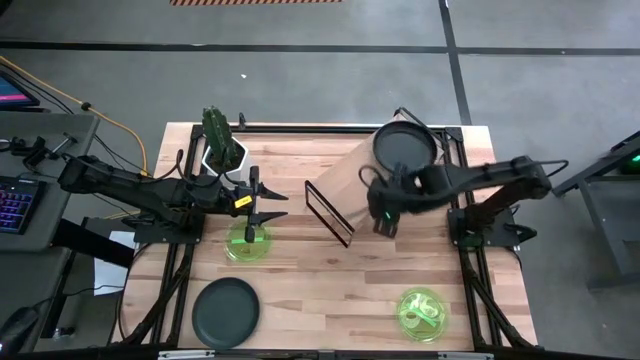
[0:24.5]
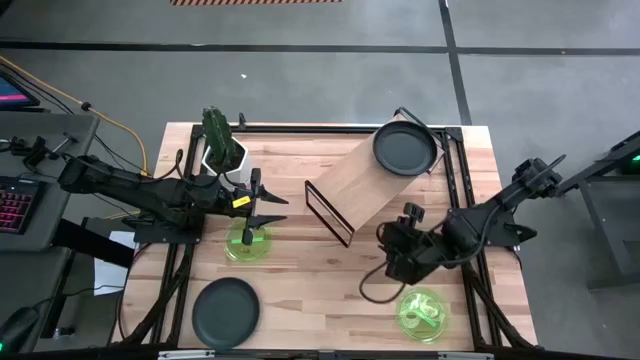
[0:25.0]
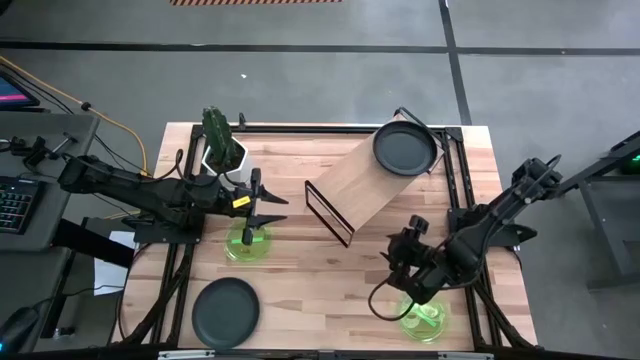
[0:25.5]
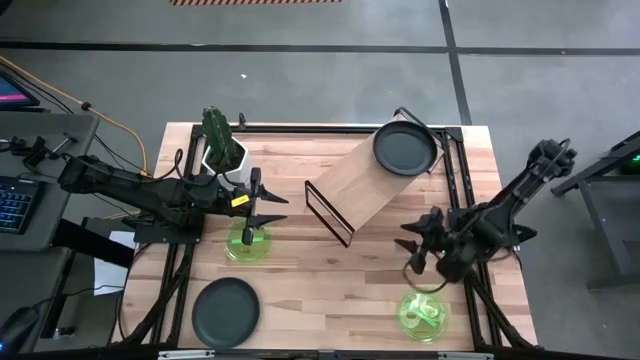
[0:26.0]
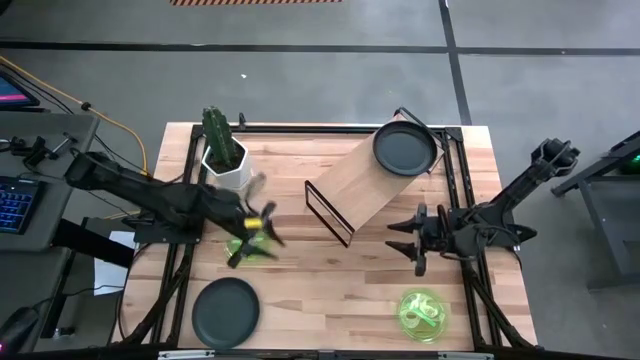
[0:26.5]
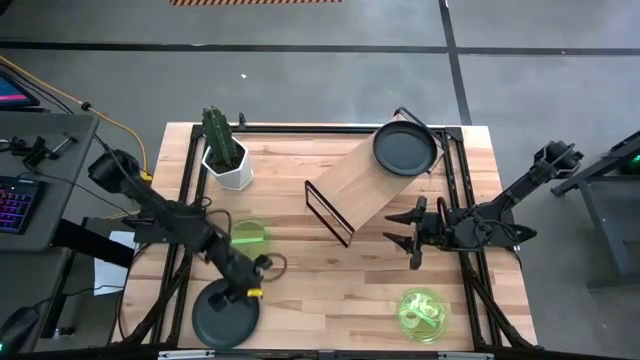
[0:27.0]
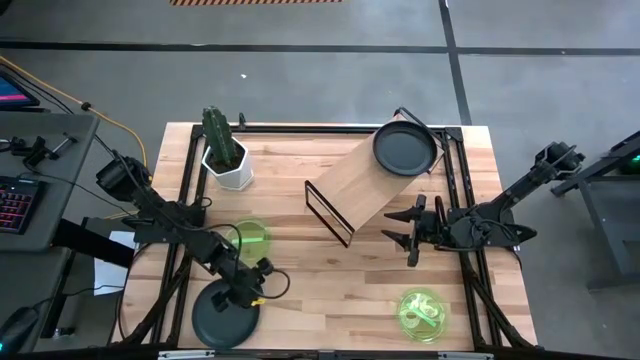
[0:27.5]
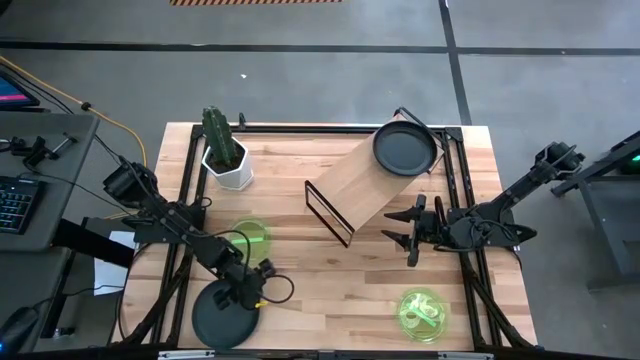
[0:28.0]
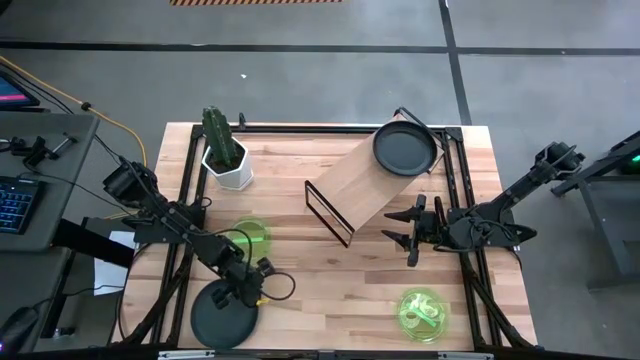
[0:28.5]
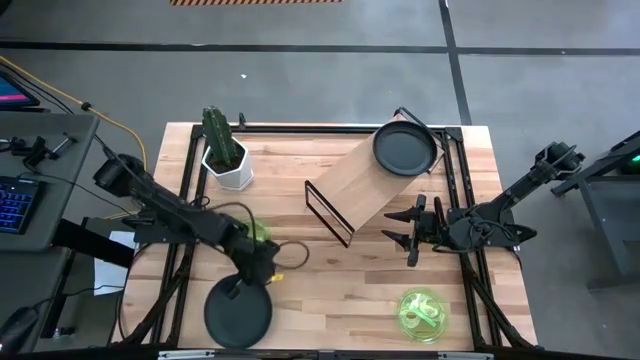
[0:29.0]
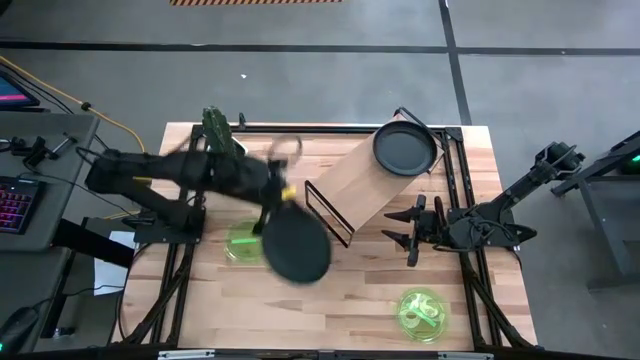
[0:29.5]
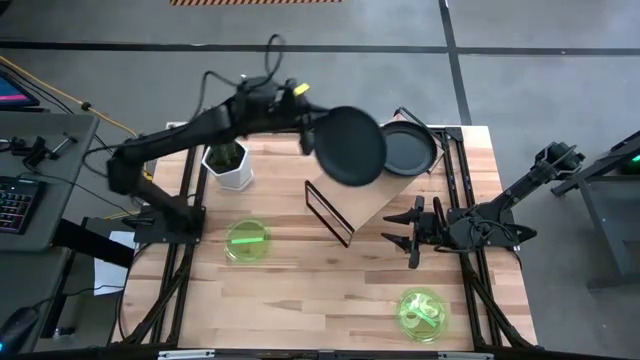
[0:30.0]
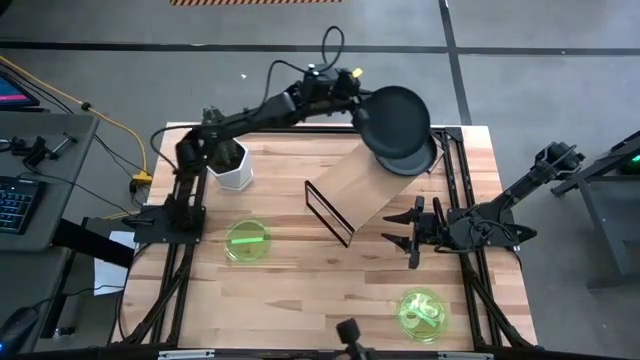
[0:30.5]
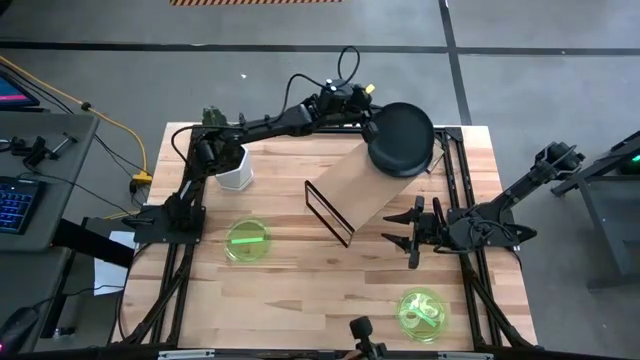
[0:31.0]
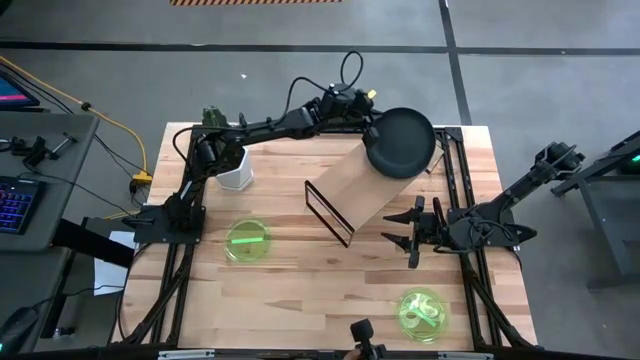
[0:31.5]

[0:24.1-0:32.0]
Task: Place and stack plates onto a shelf
Stack the black plate on top of the black plate on the shelf

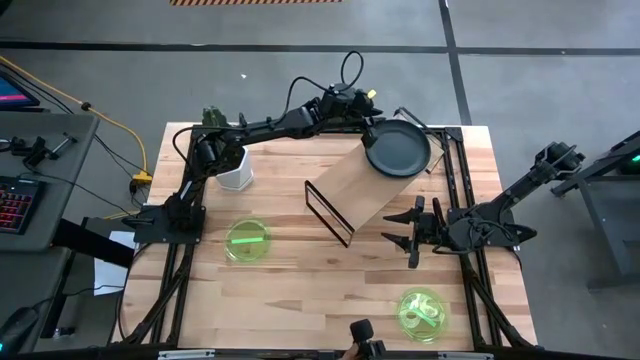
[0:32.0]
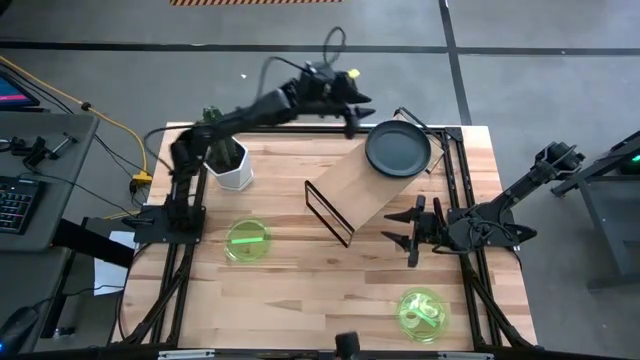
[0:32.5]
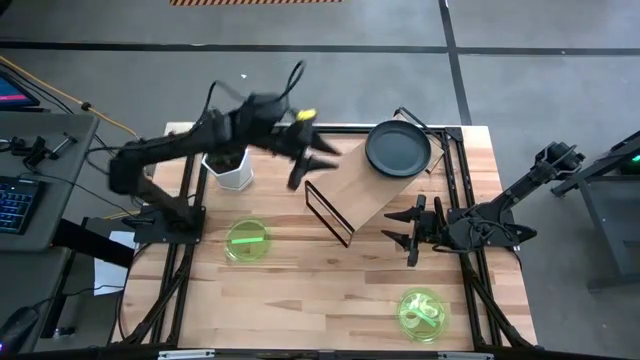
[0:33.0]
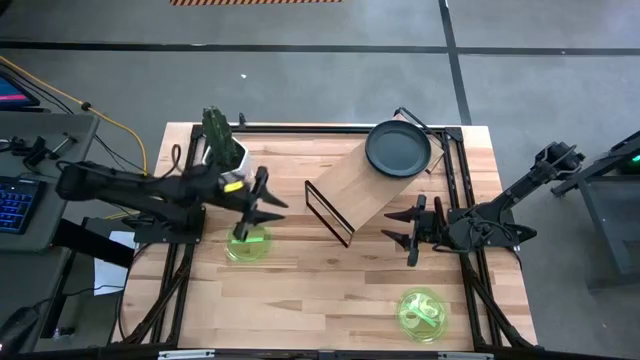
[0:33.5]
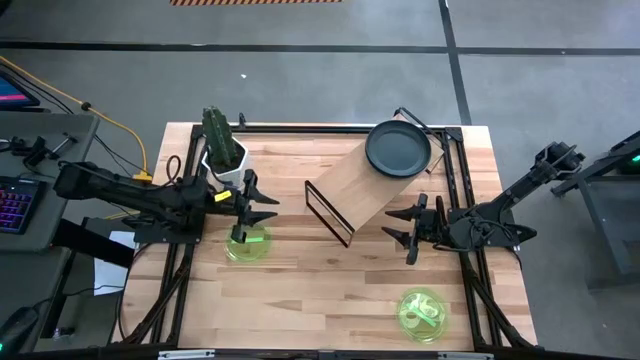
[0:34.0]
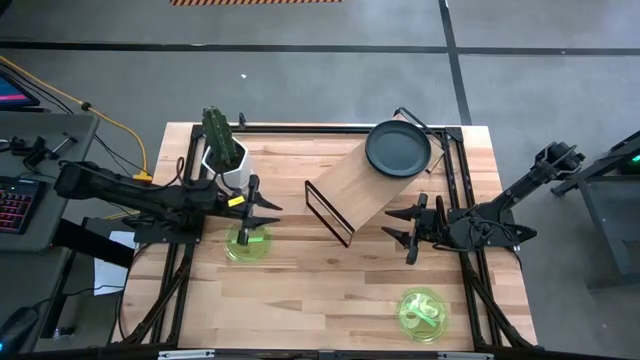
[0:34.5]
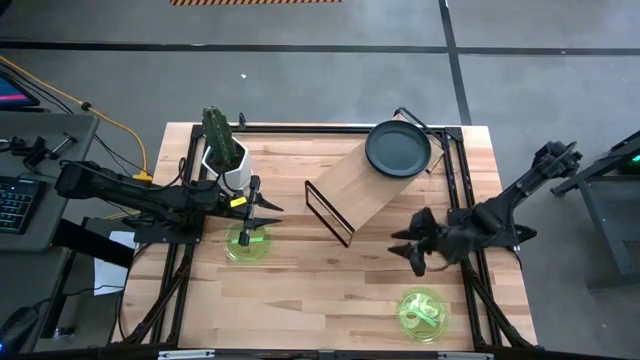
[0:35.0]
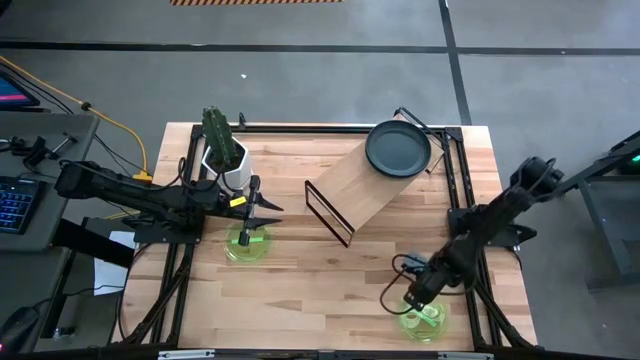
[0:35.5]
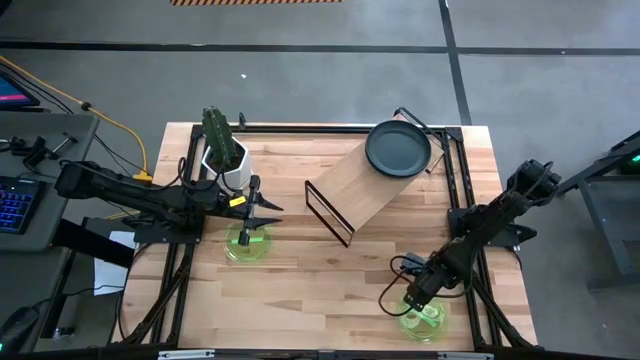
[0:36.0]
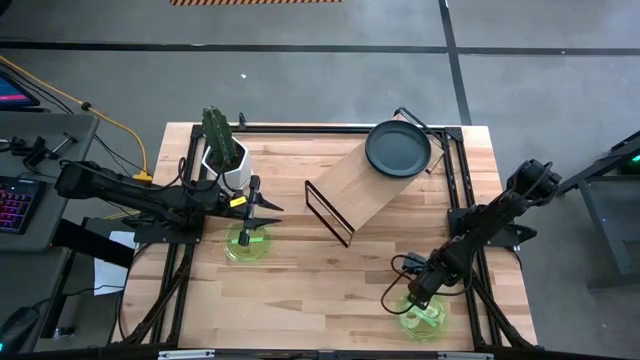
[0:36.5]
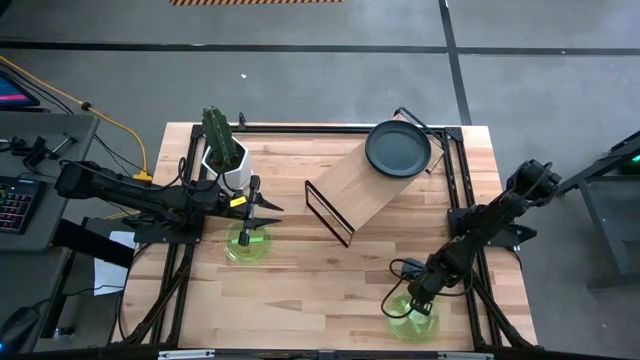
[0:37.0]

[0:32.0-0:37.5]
Put the bottom green plate on the shelf

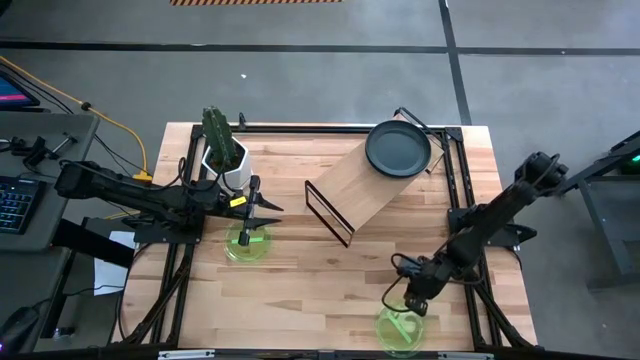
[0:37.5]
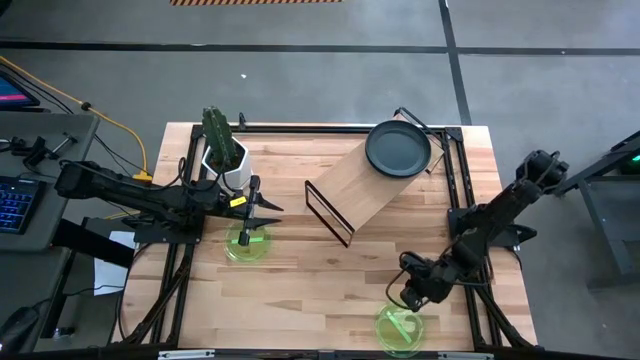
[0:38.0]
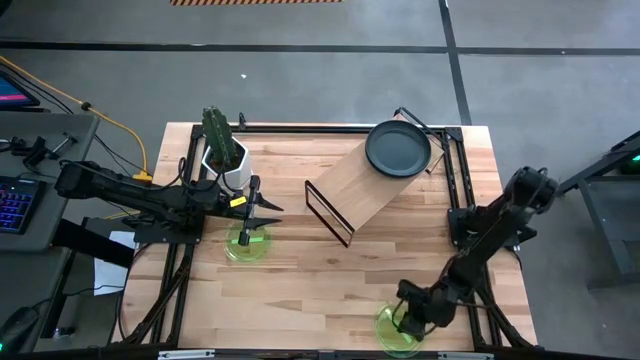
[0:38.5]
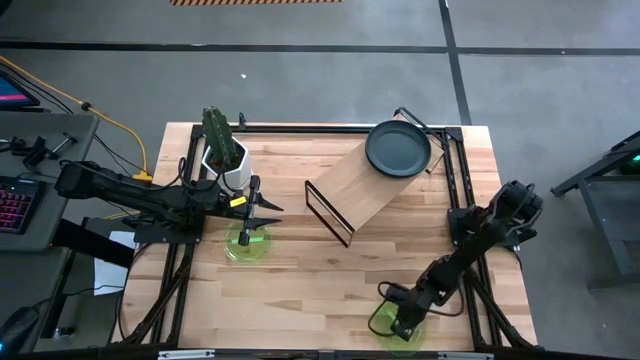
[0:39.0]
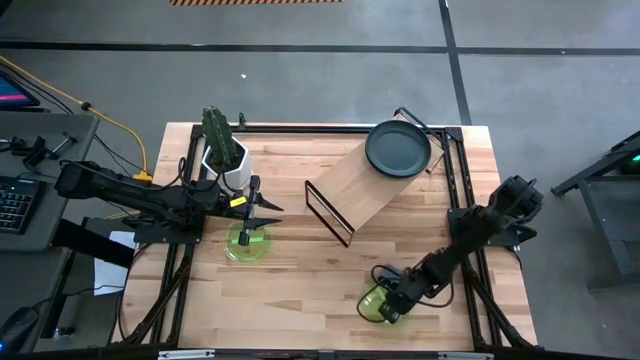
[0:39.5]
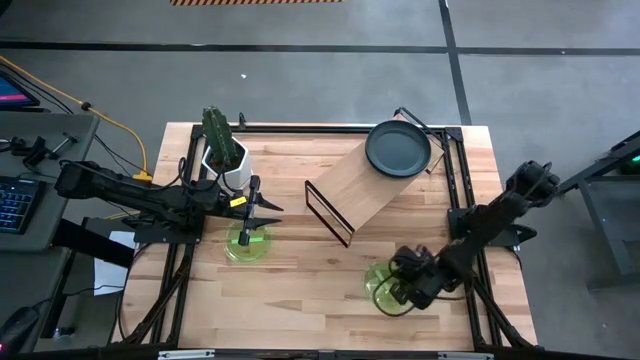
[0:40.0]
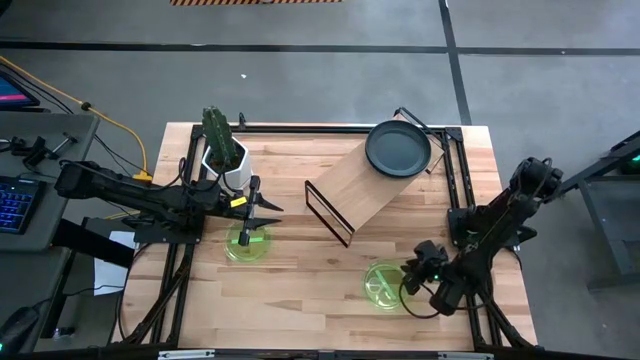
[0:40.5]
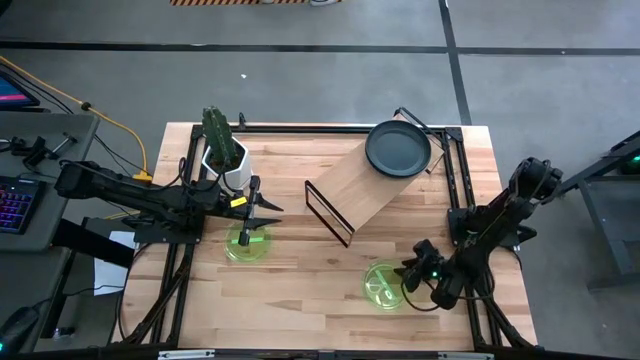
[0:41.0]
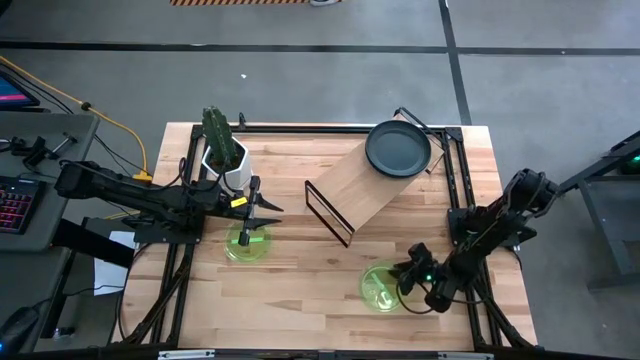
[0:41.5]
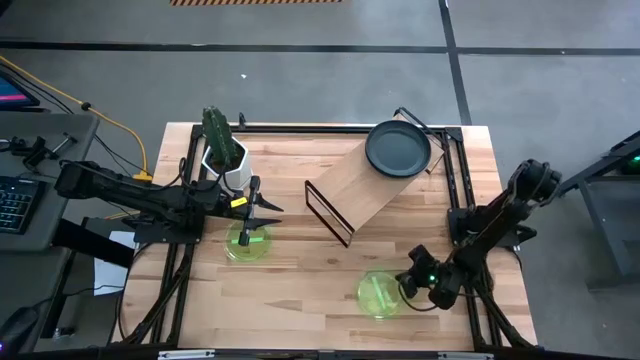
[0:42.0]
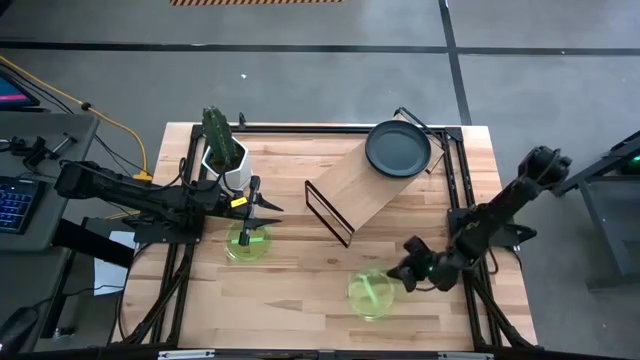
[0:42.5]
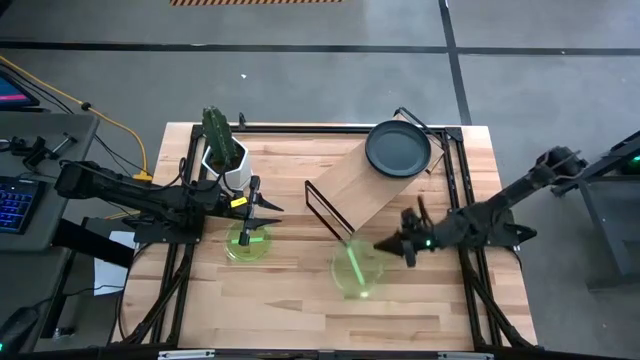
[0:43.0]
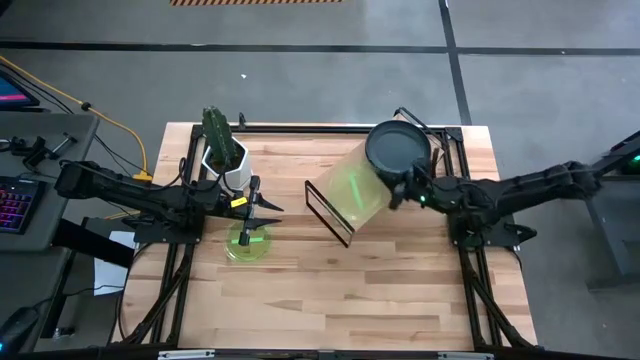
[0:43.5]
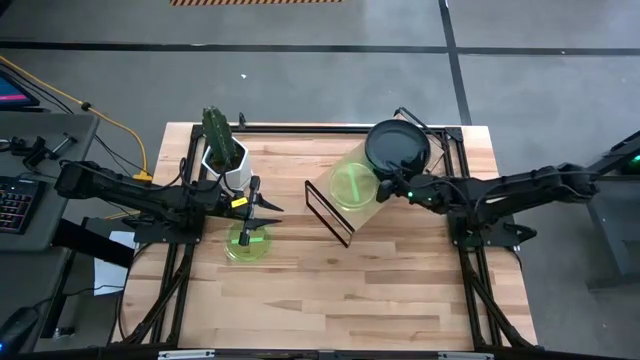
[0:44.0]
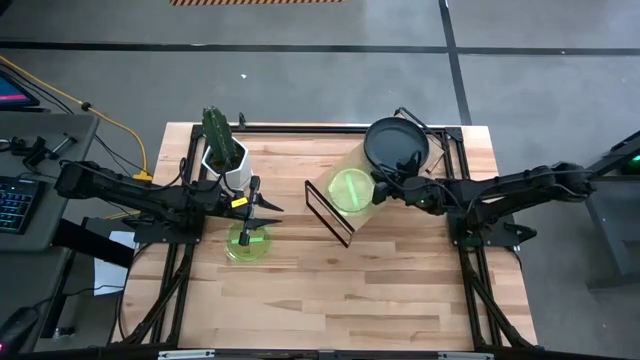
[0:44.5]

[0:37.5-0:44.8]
Put the bottom green plate on the shelf
